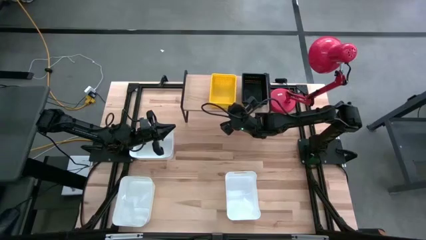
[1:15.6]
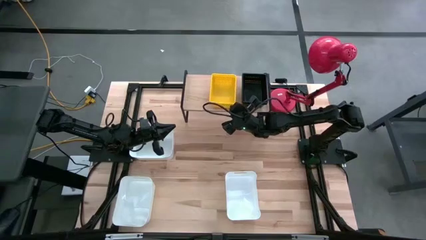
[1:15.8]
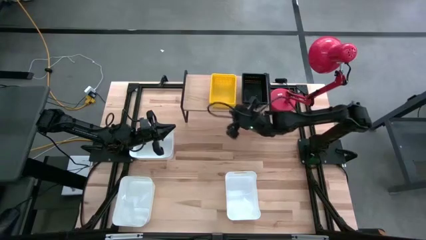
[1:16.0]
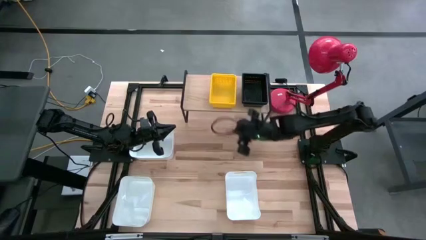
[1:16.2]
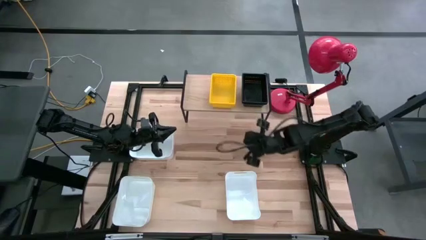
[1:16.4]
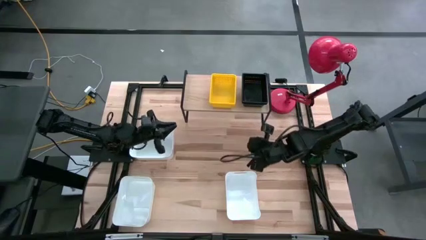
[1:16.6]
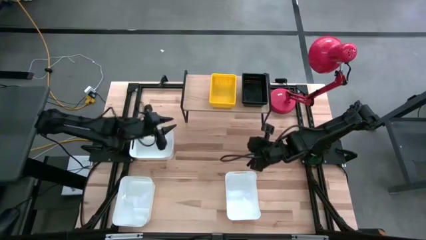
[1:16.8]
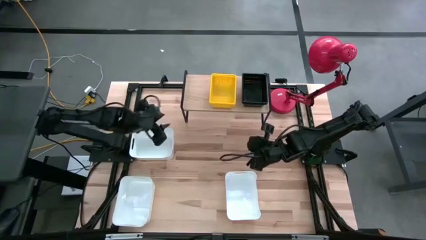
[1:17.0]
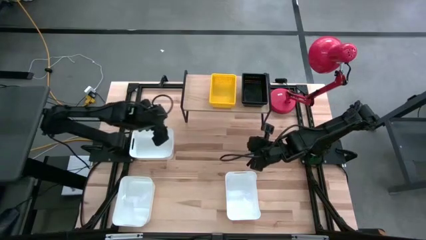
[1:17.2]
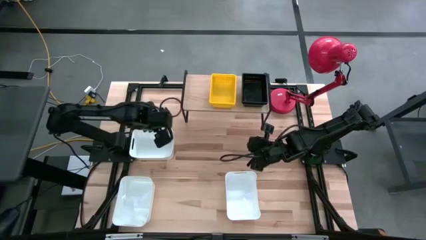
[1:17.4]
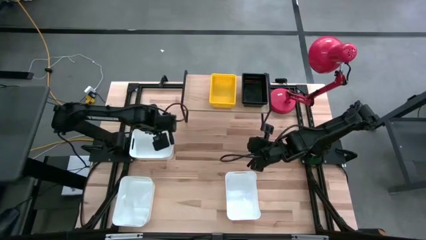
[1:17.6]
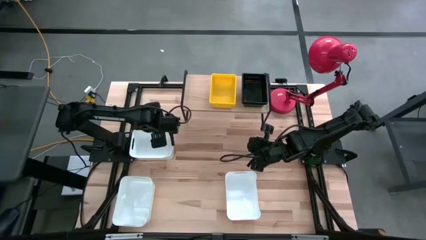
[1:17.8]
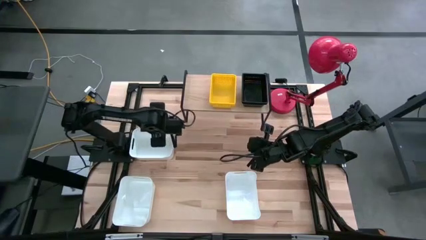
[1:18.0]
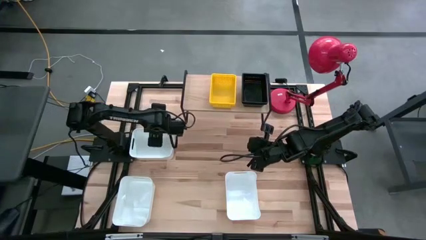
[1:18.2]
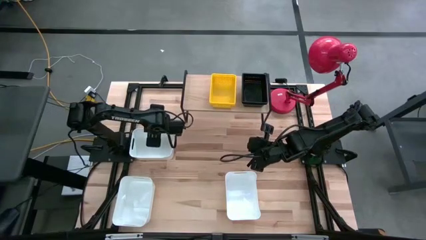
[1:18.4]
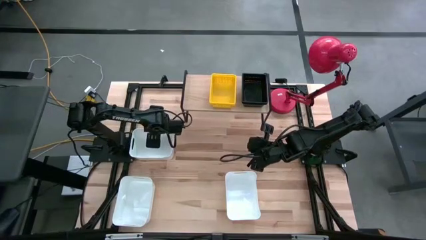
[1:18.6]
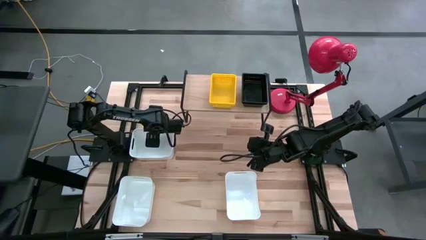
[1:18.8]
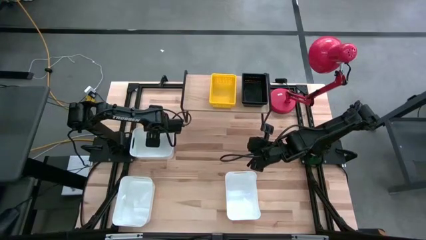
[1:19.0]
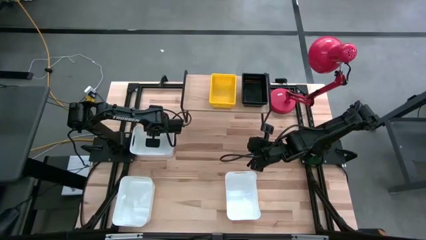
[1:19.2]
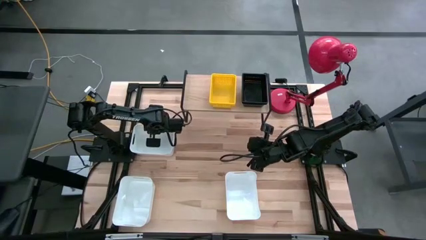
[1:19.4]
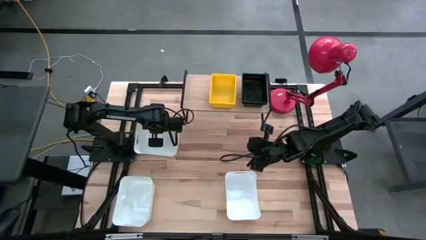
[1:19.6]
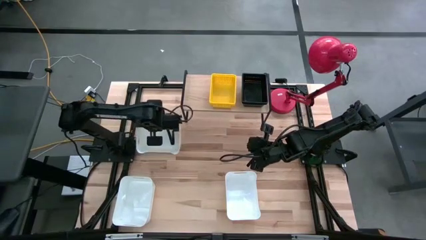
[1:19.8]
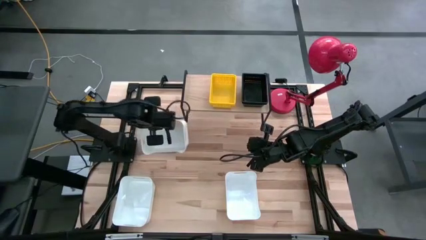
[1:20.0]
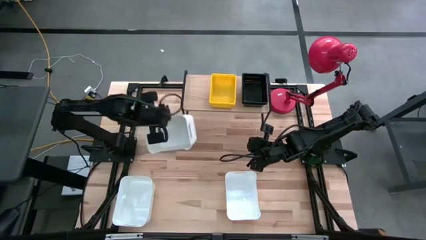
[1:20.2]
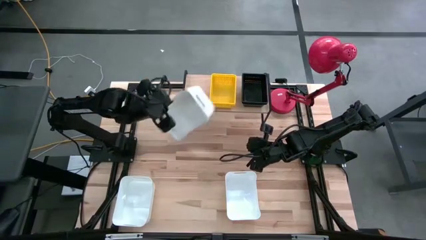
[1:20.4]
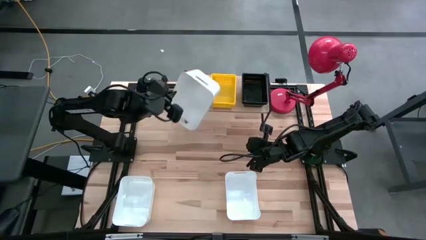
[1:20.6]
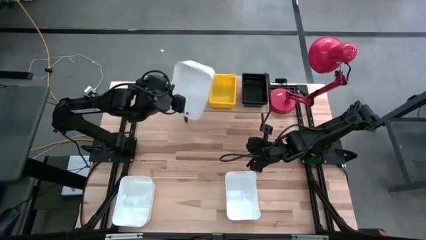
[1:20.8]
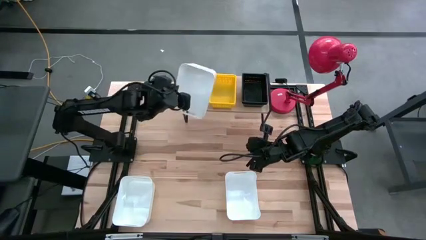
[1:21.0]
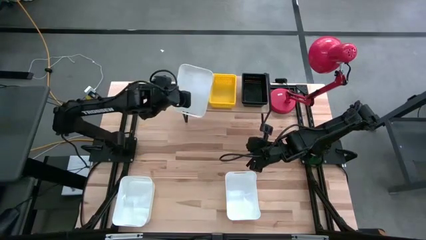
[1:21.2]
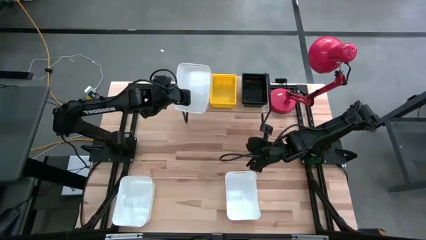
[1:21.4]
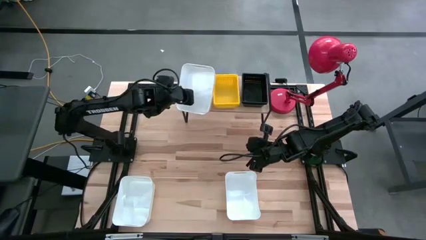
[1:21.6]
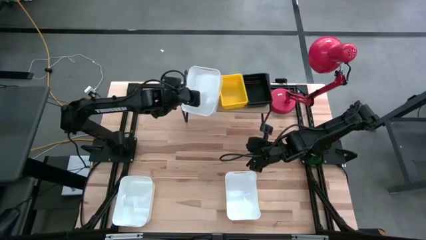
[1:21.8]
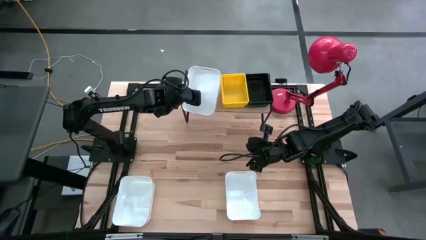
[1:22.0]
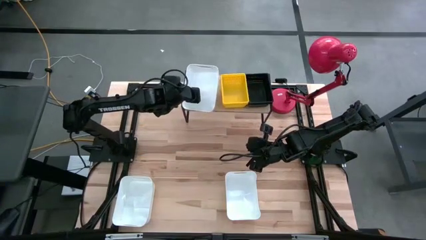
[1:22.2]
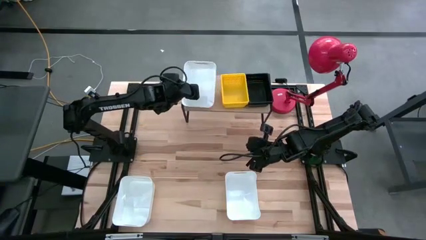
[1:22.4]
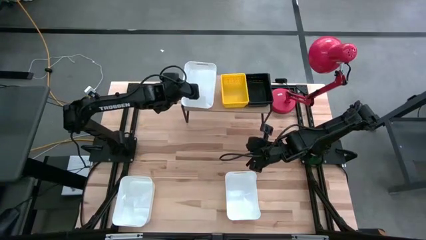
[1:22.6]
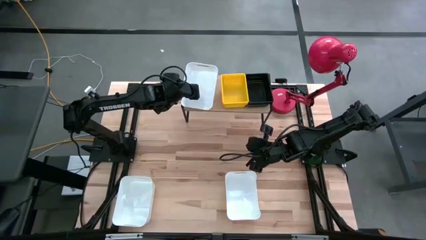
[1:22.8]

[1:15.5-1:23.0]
Task: Stack baskets on shelf by color
Put the top white bin on the shelf

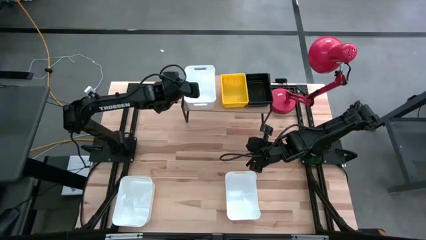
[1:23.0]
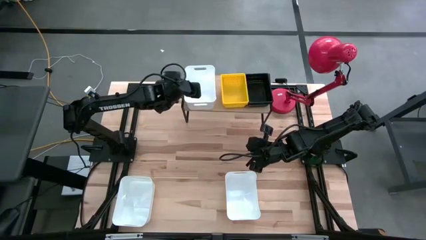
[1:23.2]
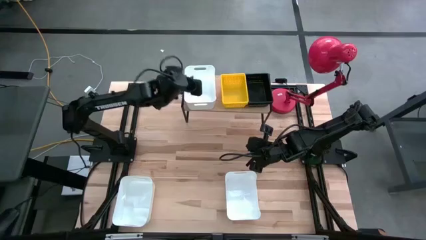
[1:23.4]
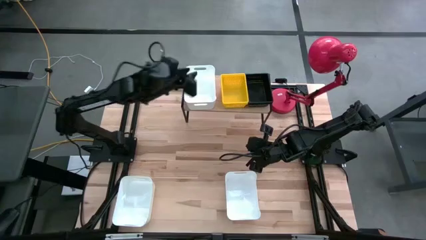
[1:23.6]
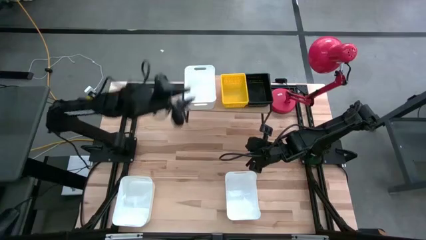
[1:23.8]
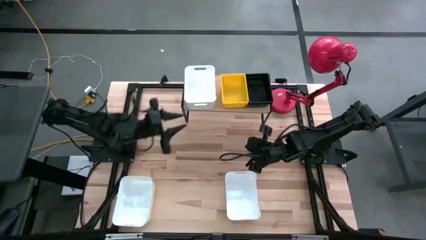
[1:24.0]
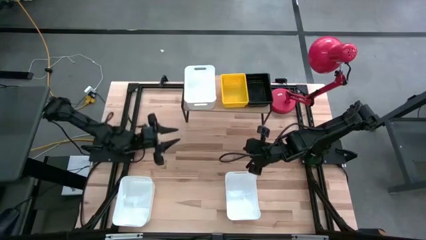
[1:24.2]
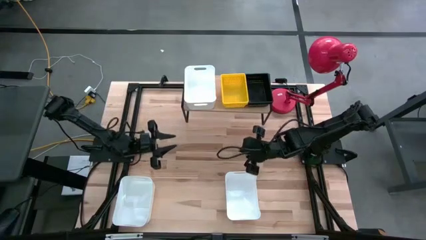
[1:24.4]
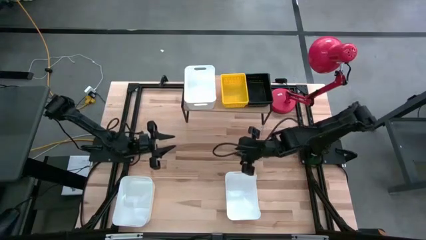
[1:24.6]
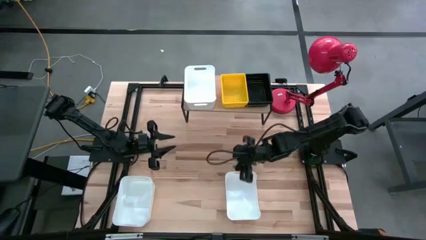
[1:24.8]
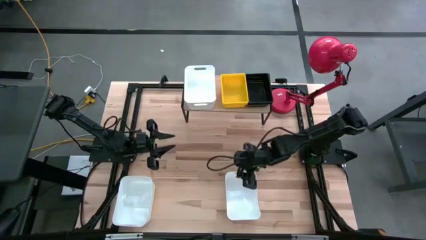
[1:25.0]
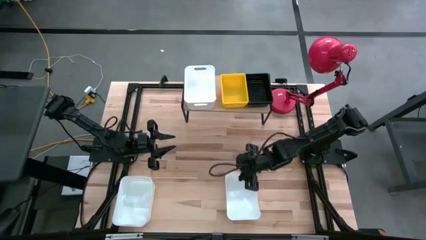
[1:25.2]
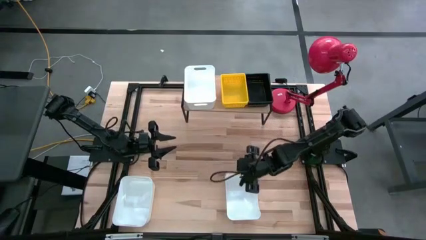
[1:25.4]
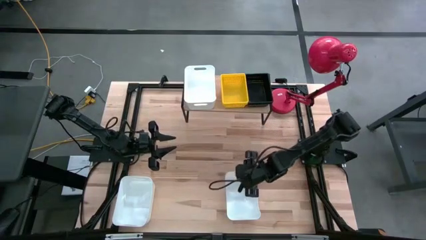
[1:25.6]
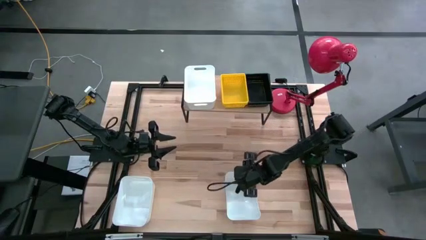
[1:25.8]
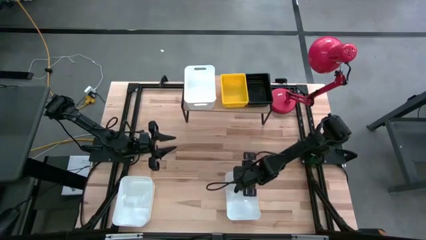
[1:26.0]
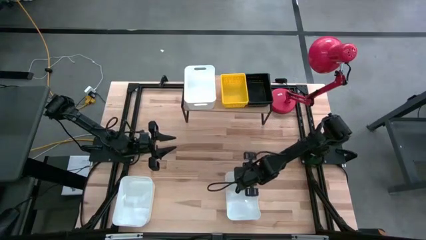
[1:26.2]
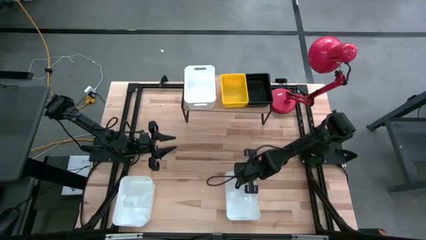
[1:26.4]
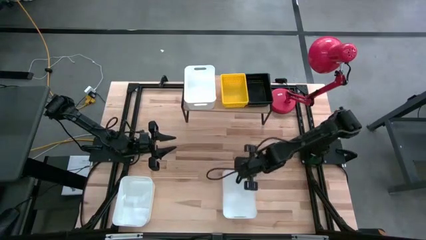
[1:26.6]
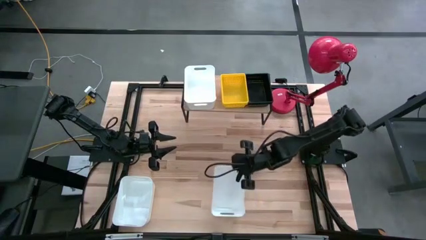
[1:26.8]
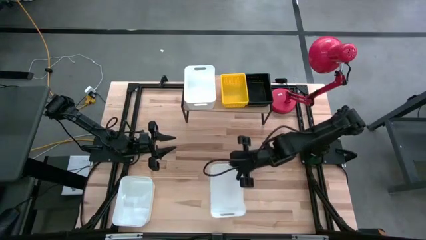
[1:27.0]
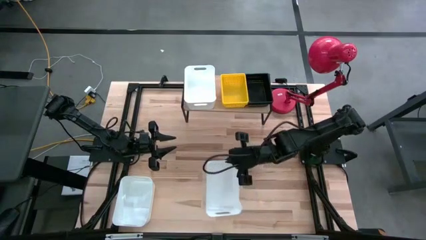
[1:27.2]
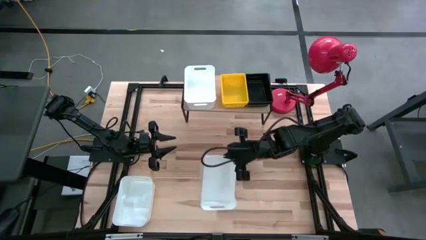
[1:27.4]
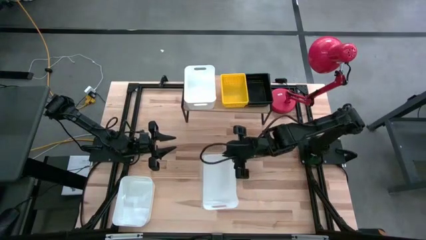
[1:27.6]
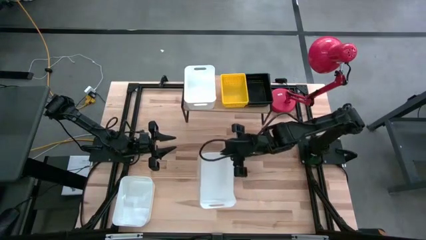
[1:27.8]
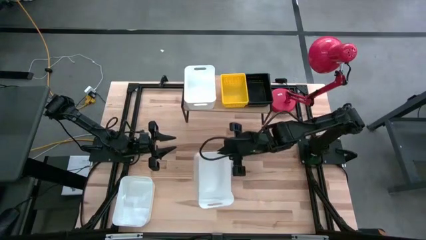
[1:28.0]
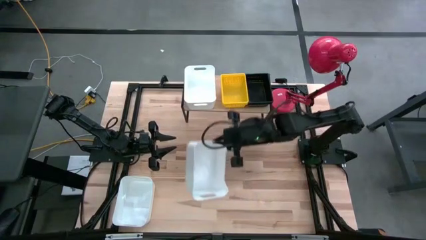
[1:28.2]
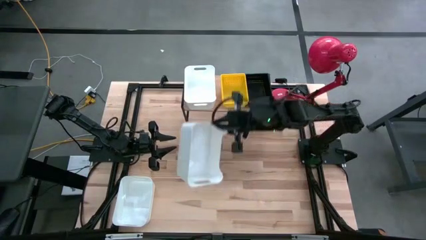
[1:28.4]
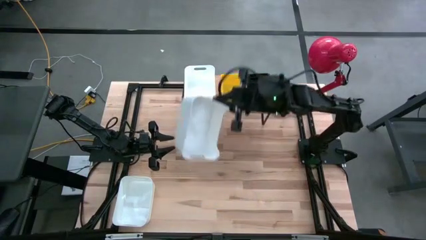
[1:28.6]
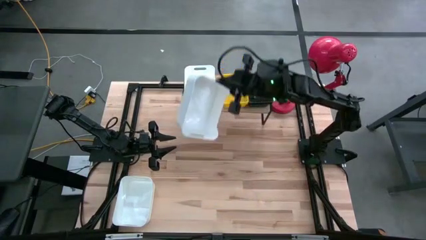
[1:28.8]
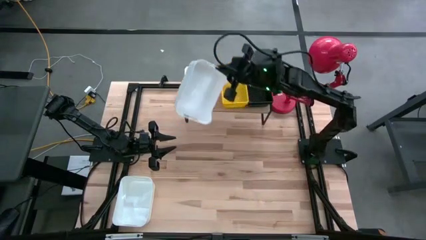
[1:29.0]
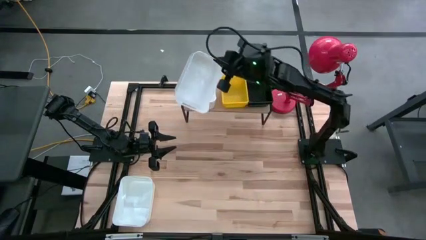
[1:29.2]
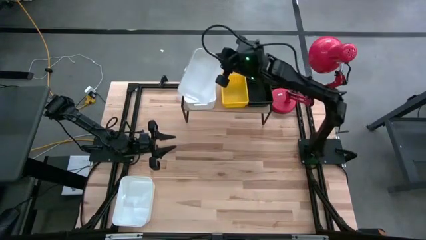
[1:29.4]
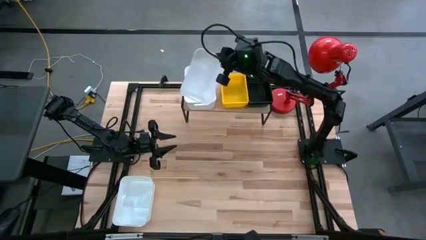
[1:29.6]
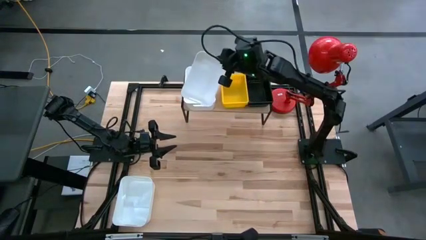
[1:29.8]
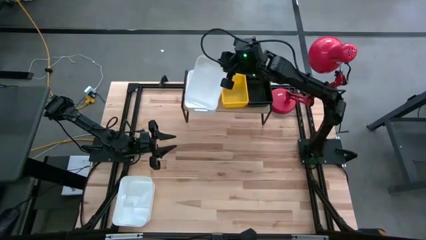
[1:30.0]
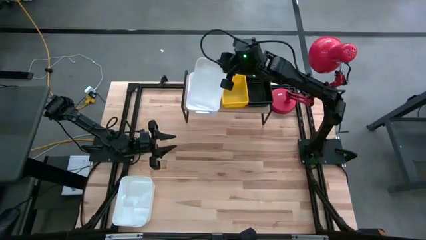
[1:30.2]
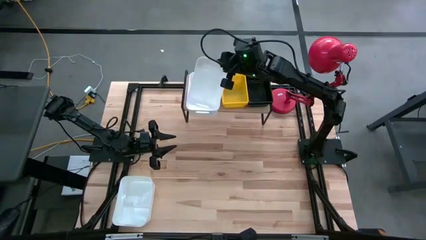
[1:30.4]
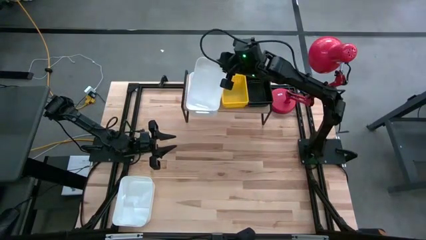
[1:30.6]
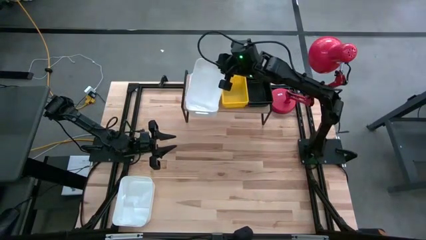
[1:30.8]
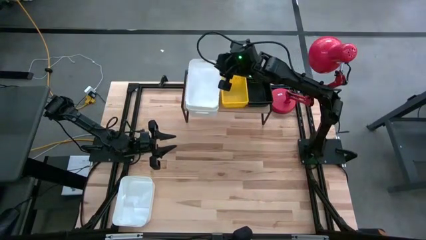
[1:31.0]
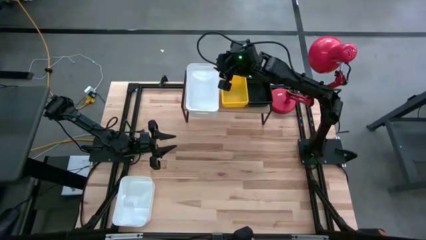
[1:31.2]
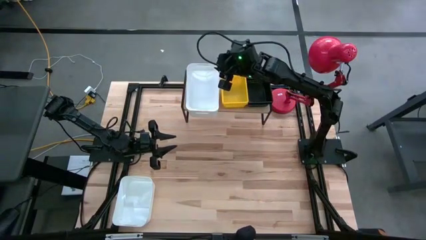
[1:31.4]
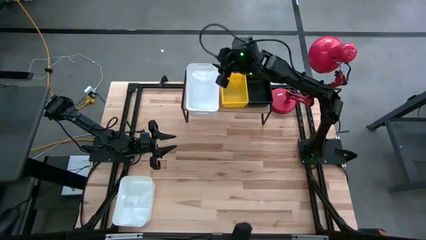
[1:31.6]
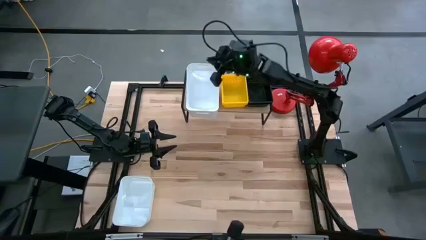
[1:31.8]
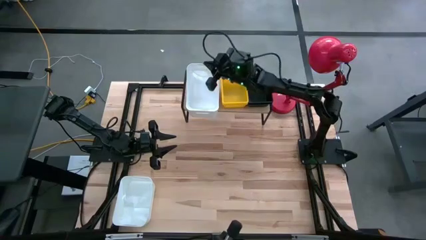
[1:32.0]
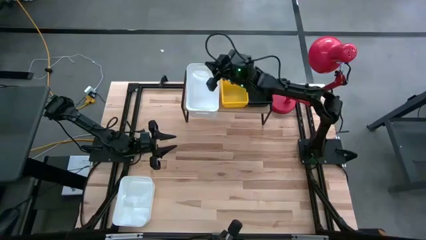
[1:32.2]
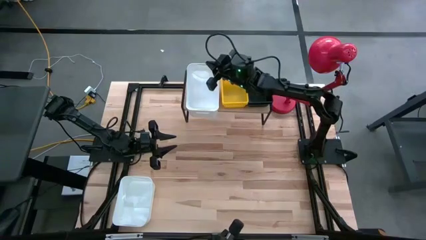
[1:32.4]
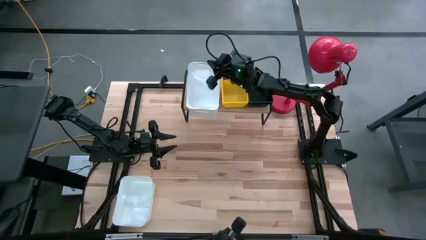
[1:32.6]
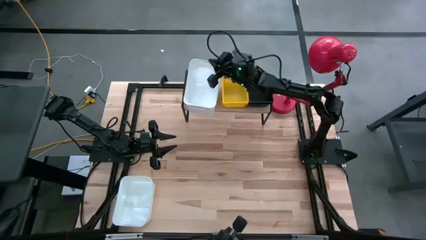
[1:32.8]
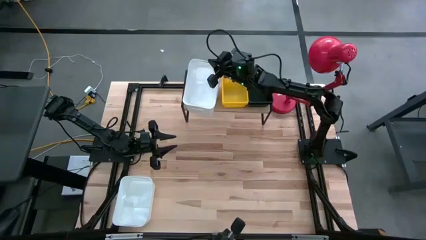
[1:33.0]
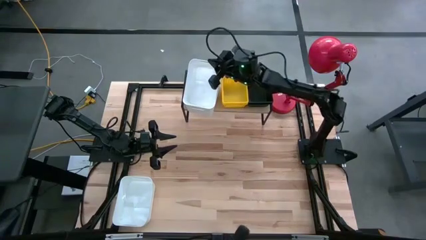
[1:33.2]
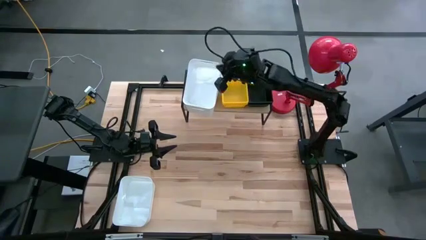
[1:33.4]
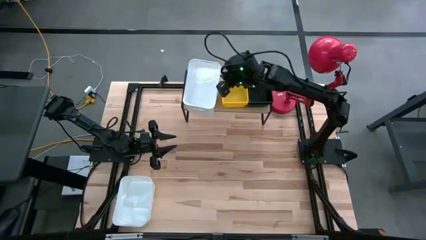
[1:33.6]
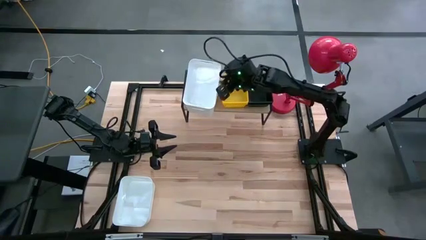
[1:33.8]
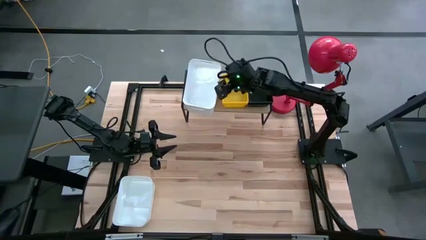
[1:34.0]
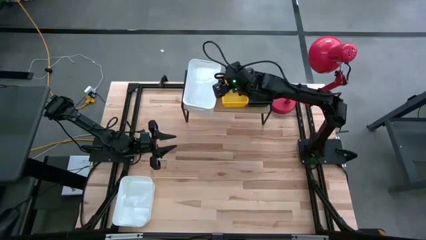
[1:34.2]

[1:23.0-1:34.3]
Stack the right white bin on the other white bin on the shelf
